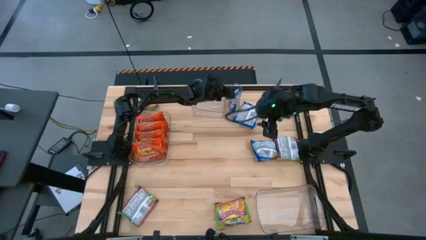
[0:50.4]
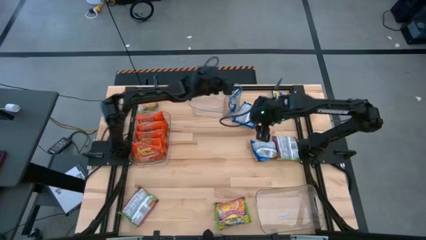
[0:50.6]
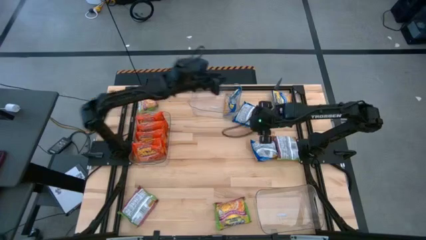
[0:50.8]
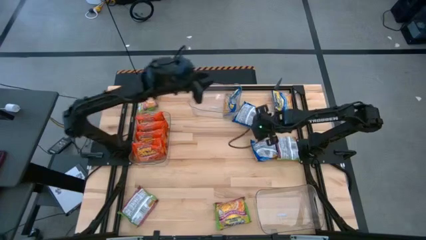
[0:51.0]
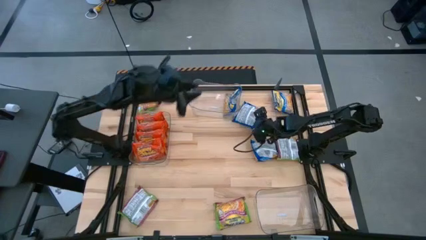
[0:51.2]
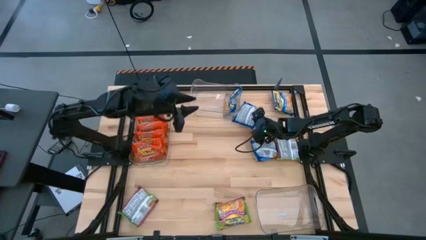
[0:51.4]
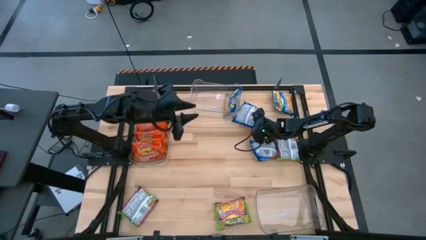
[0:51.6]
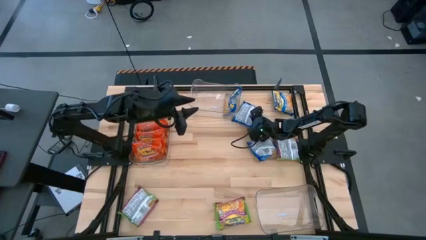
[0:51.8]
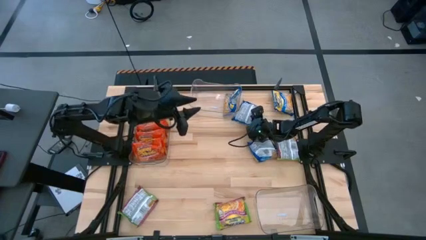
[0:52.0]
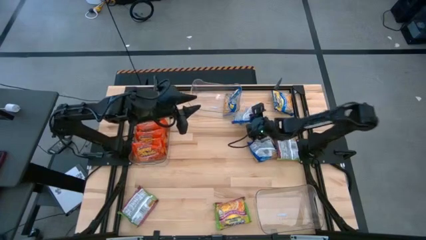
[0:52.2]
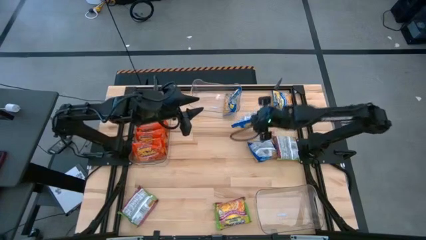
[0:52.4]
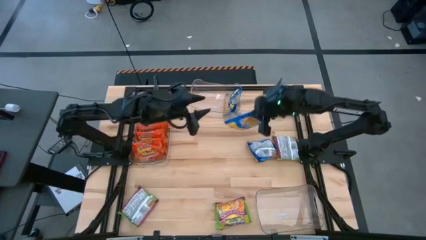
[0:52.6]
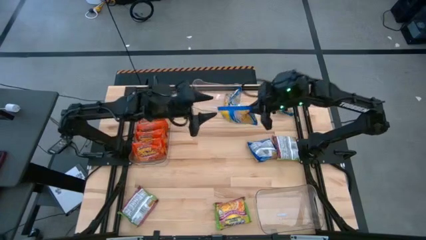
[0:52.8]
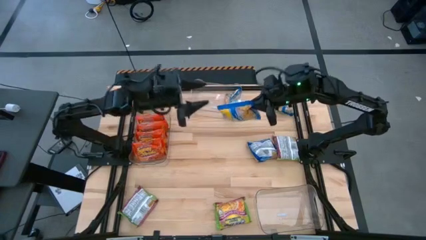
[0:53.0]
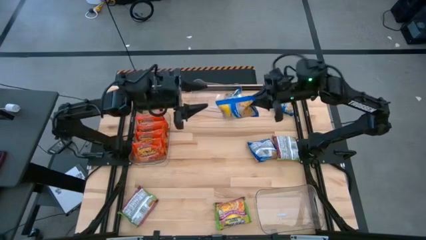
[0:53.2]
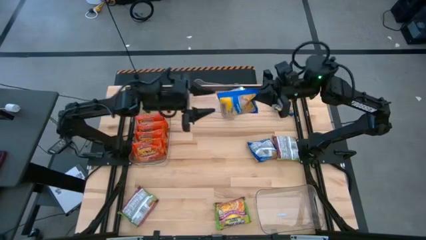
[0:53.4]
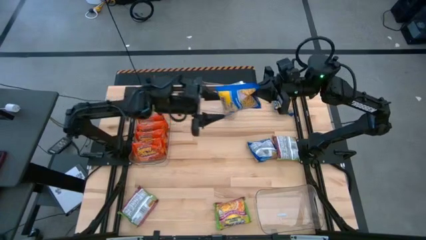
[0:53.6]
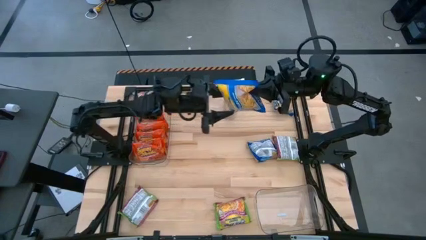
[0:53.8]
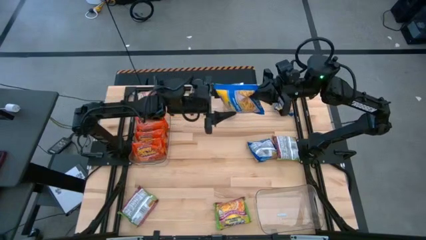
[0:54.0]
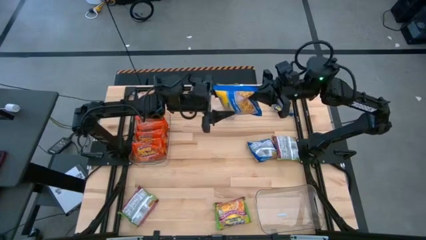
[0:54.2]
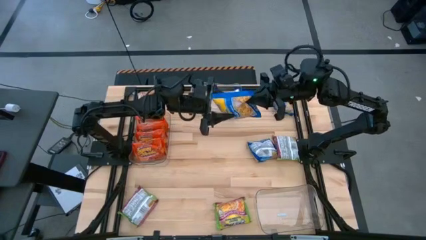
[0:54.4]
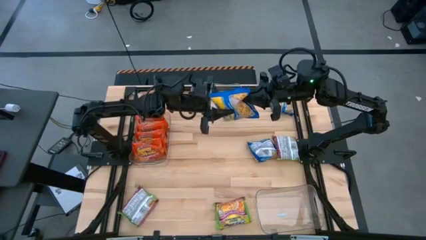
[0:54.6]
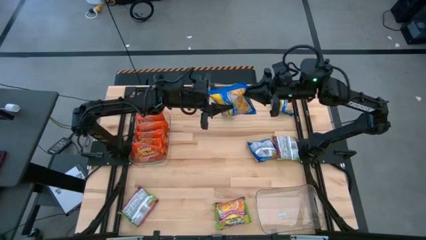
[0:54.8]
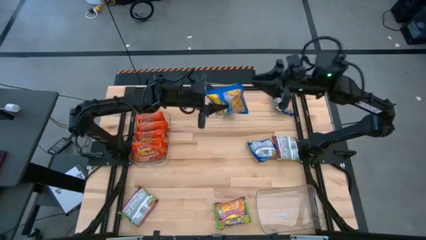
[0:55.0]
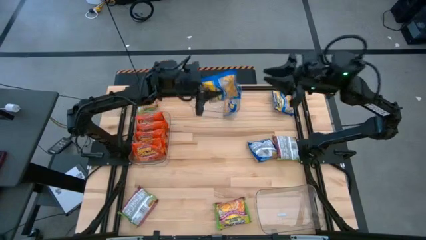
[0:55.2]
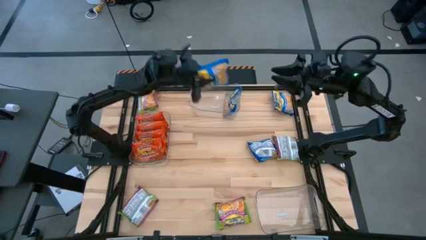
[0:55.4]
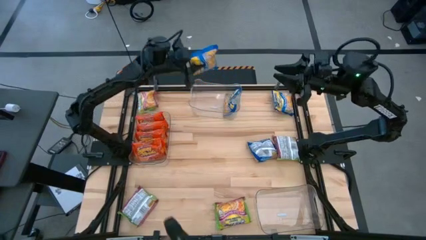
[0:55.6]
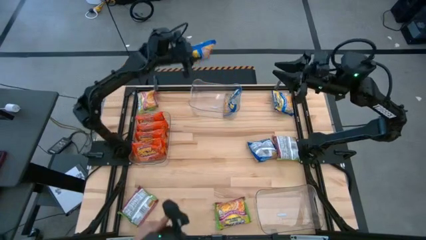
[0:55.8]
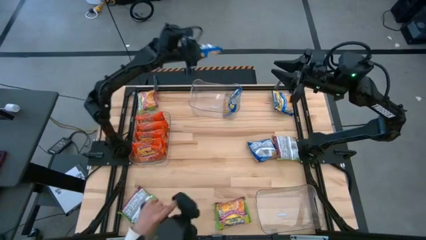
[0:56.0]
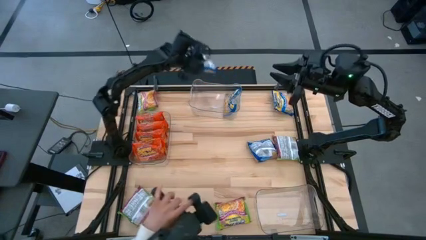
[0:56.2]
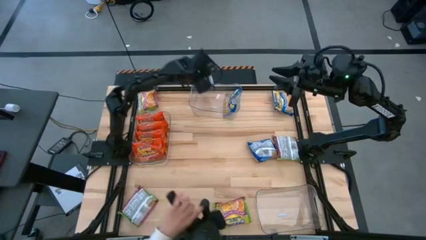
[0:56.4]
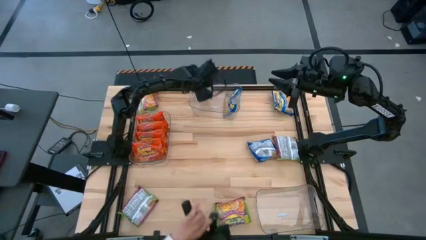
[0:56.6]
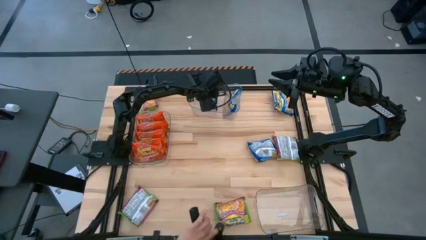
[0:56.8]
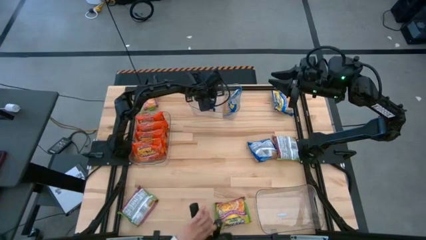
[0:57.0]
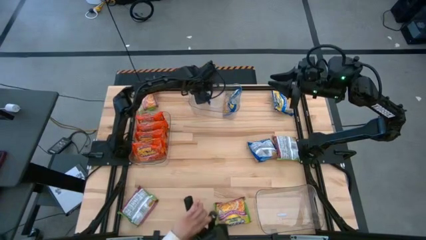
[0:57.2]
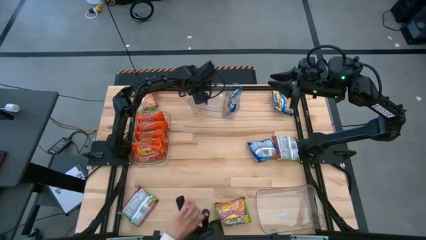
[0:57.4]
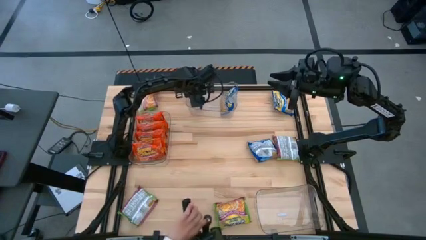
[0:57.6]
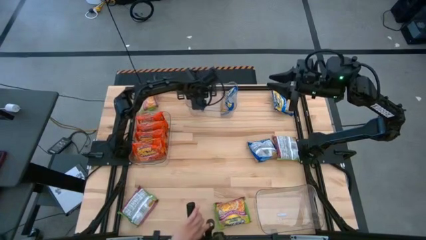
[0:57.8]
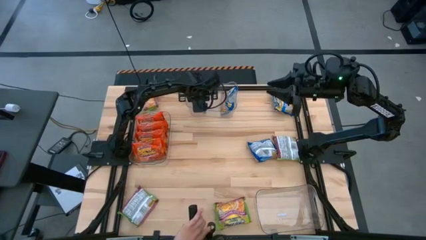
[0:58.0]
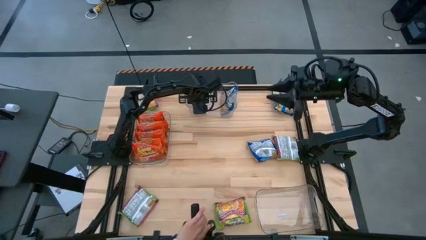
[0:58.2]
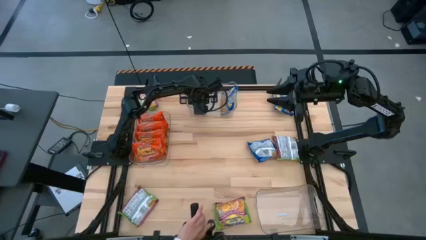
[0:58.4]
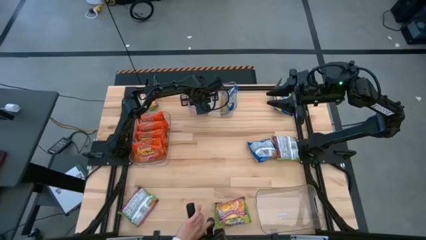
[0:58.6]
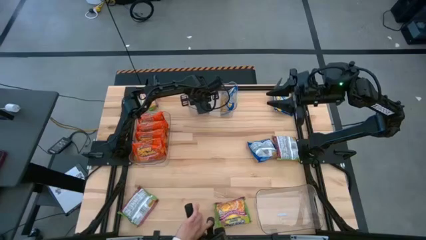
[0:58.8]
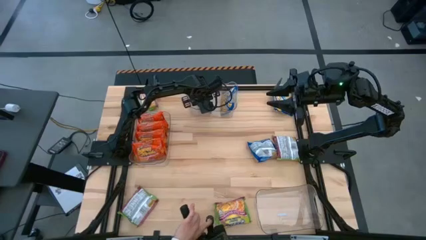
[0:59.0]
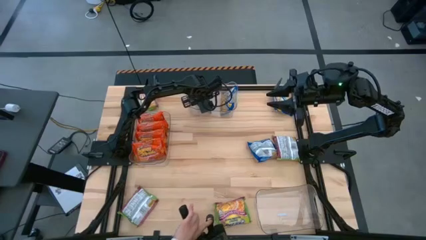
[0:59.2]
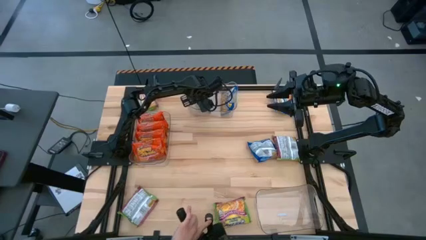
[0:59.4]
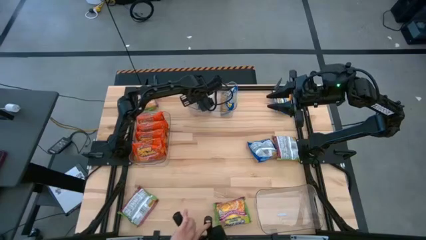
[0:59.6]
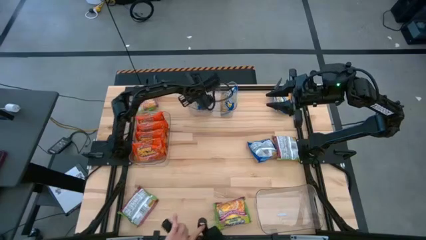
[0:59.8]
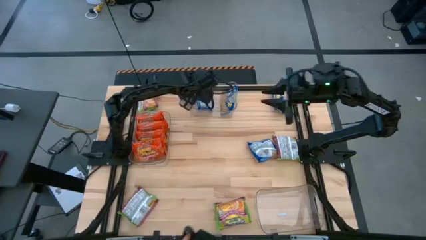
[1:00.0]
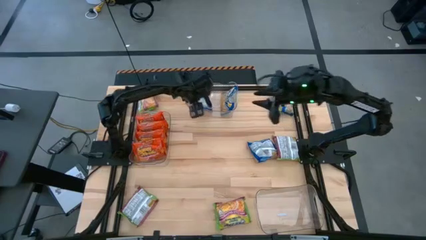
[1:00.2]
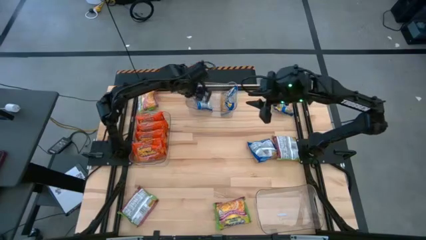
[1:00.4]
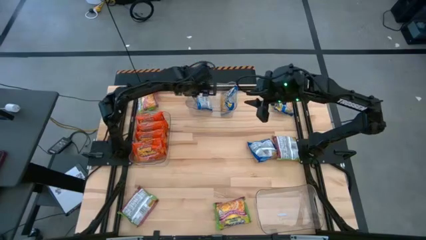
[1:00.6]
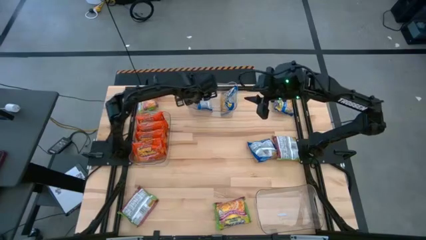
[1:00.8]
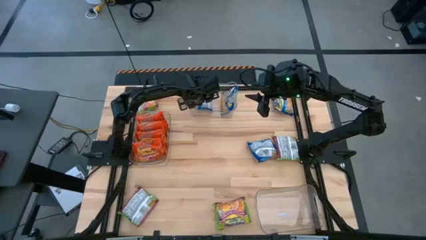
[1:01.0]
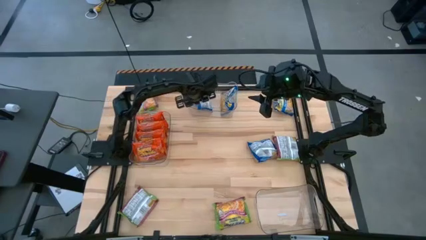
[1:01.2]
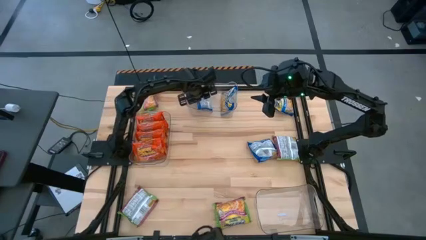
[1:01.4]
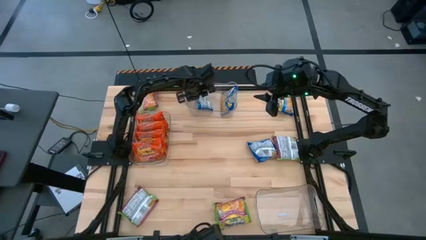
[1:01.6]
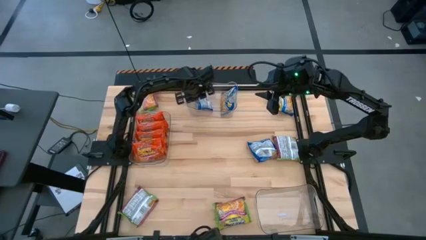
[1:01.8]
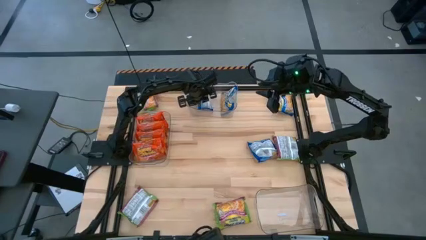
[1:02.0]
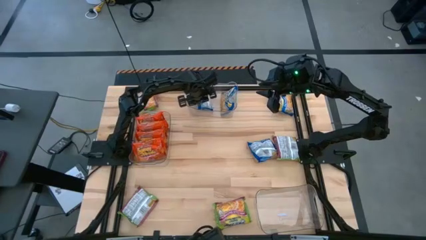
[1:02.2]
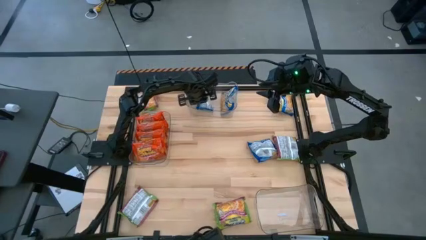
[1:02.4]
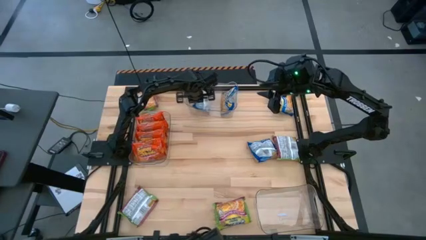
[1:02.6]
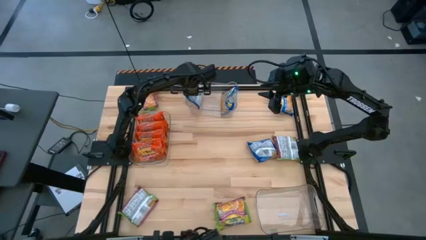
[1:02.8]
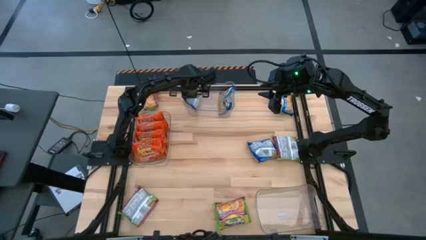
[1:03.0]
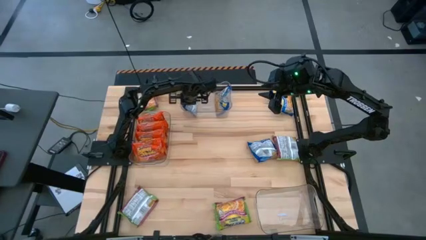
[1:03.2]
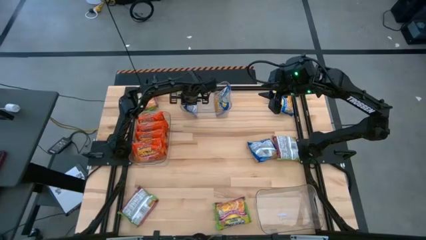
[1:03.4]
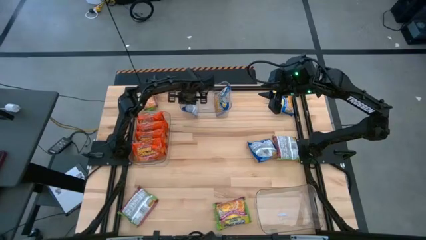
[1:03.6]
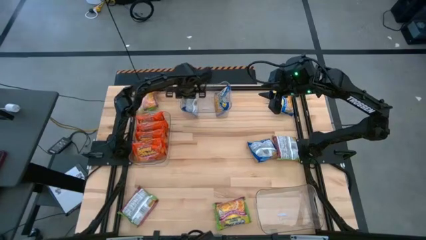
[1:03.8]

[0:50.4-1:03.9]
Task: Sort Maruchan noodles
Put the blue noodles into the middle transparent bin

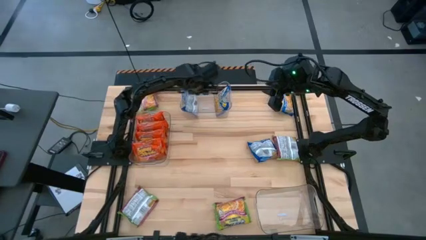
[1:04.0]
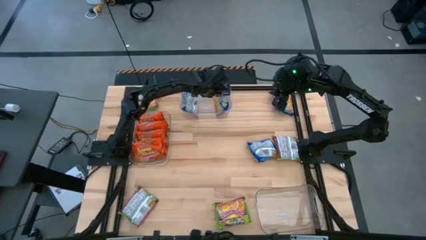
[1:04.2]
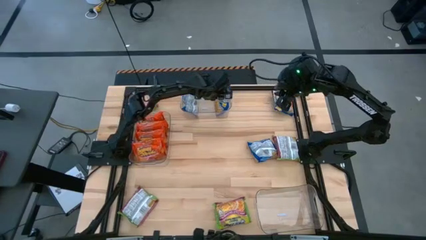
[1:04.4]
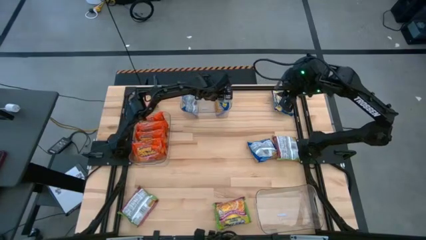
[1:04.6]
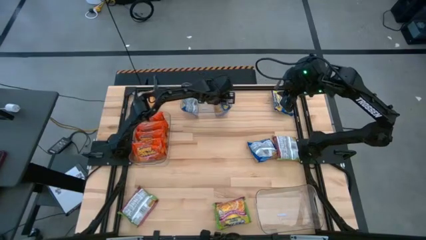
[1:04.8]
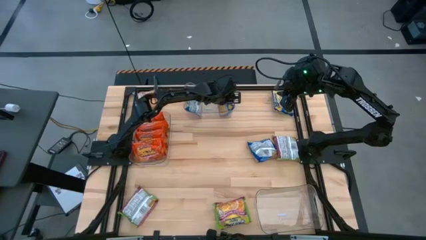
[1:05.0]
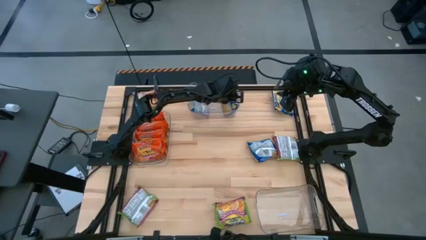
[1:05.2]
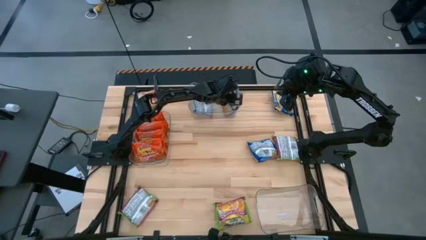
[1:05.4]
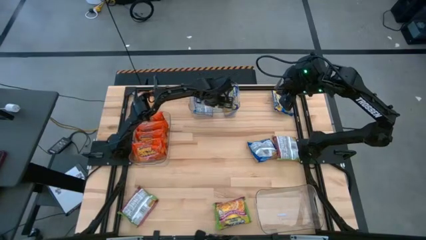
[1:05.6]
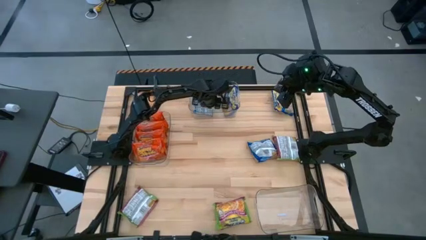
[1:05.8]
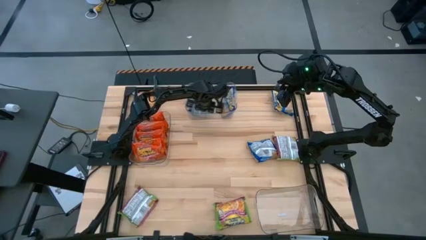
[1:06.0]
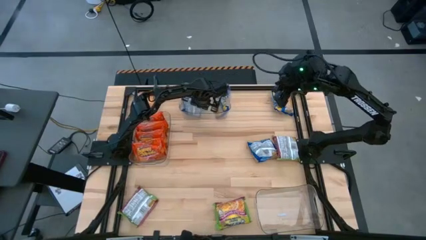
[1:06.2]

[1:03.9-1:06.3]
Adjust the middle transparent bin

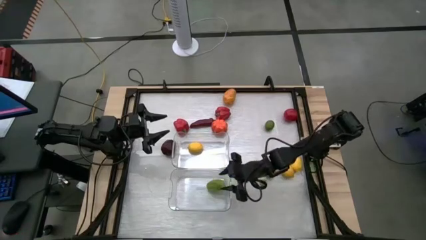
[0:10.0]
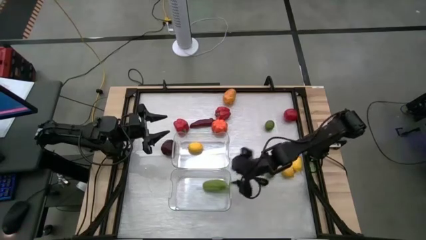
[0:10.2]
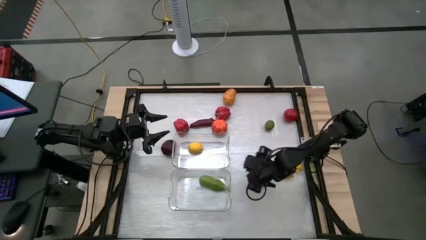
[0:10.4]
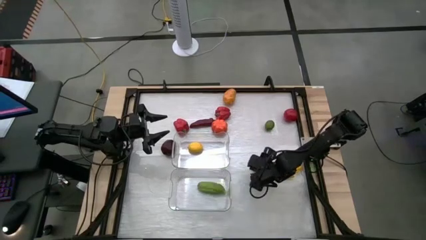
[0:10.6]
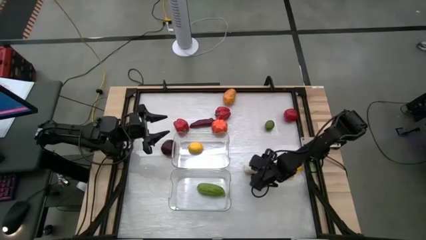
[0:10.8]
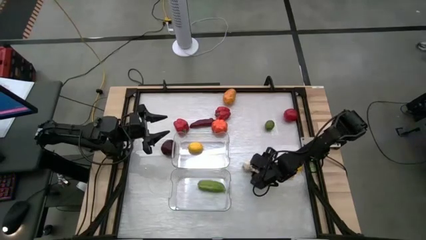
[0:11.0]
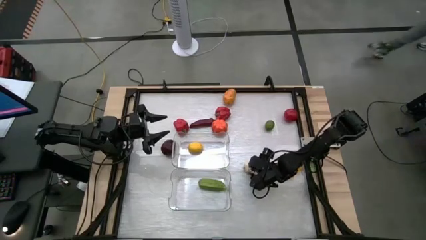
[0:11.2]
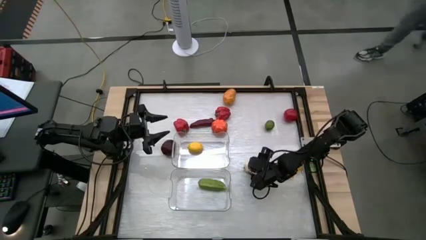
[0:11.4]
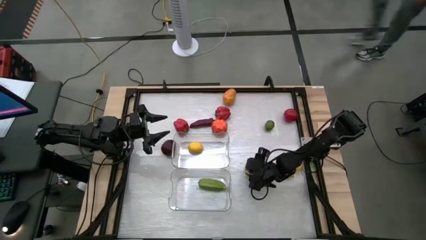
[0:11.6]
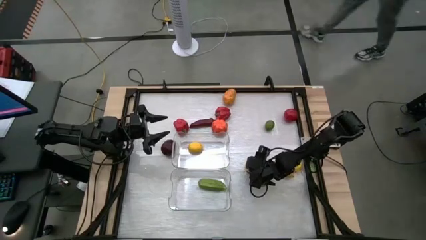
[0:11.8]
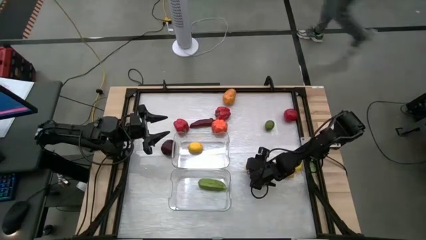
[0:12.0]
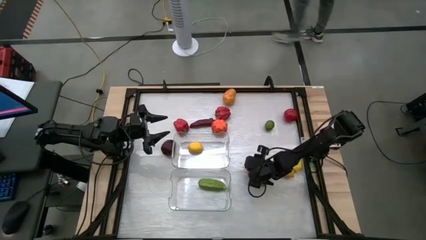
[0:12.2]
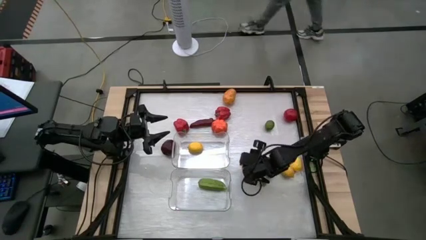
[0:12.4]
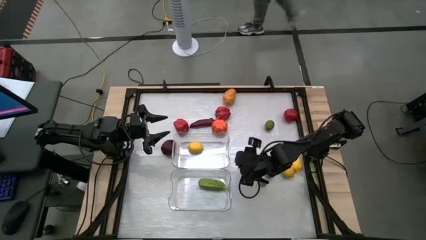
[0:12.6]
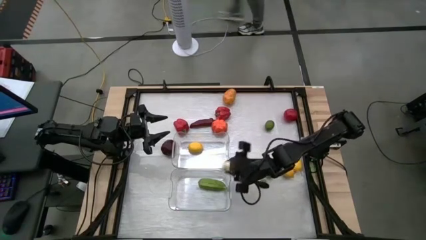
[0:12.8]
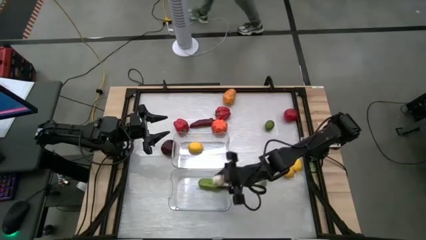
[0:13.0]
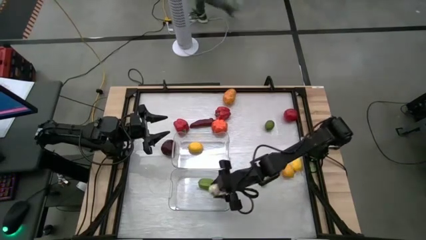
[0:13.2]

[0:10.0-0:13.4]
Task: Sort produce into baskets
Put the white garlic into the bottom transparent bin
